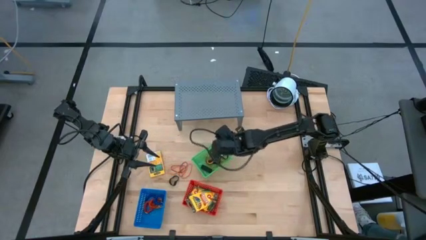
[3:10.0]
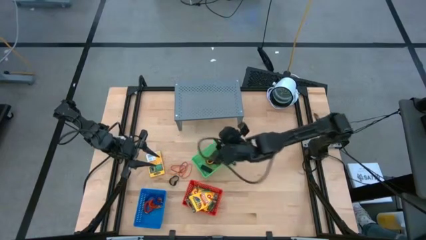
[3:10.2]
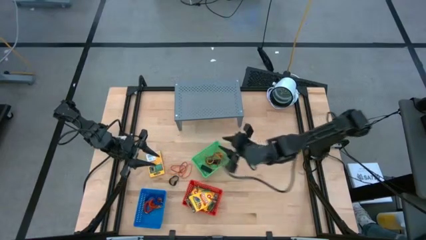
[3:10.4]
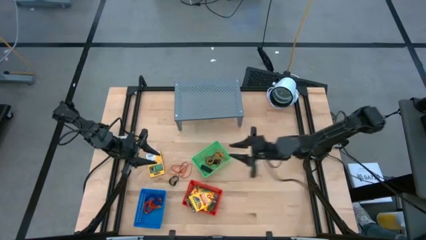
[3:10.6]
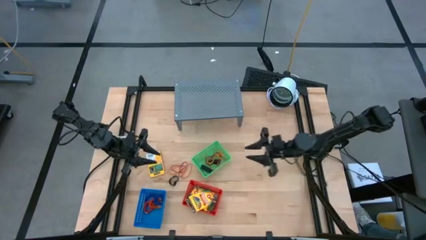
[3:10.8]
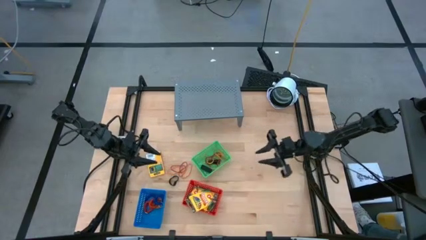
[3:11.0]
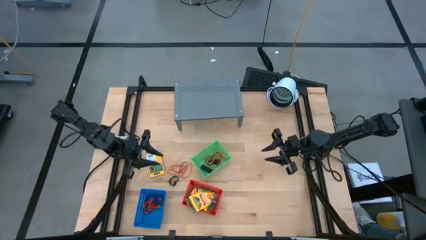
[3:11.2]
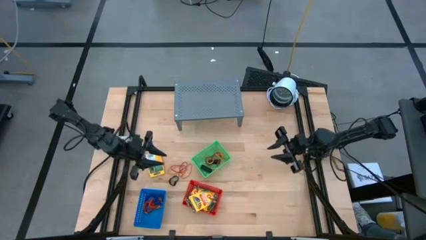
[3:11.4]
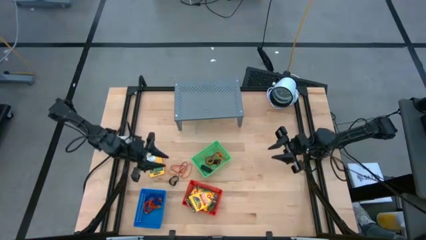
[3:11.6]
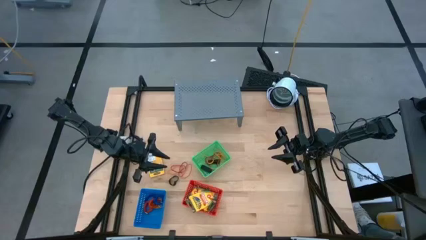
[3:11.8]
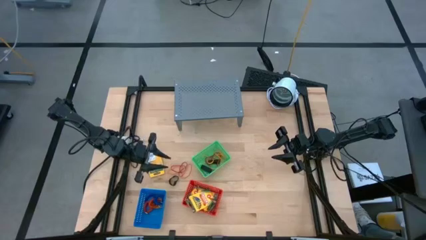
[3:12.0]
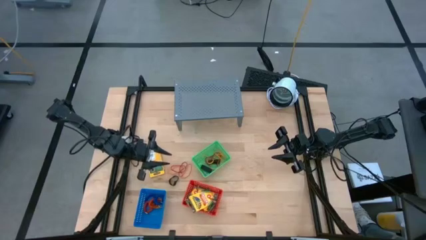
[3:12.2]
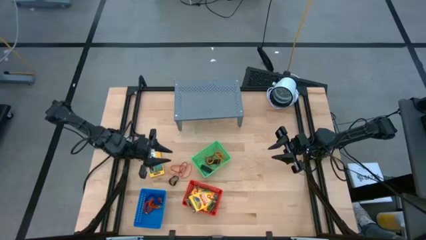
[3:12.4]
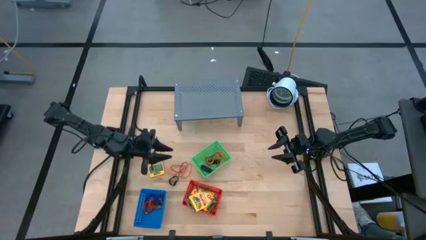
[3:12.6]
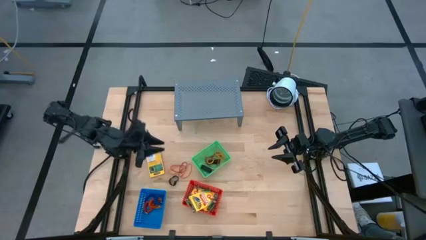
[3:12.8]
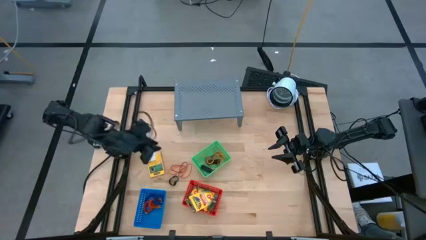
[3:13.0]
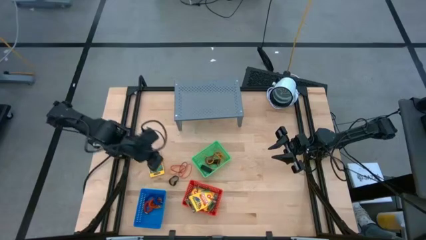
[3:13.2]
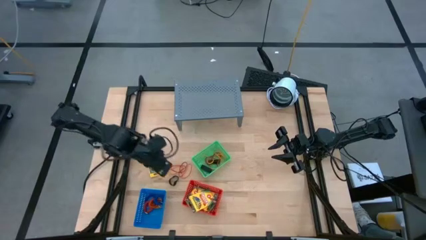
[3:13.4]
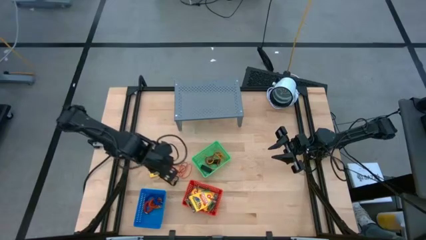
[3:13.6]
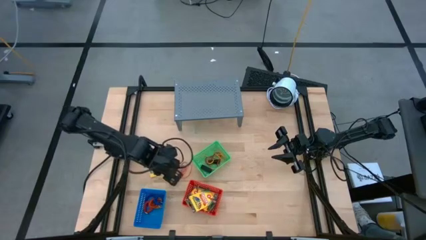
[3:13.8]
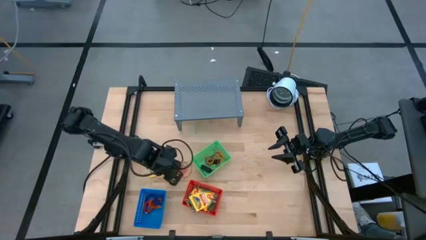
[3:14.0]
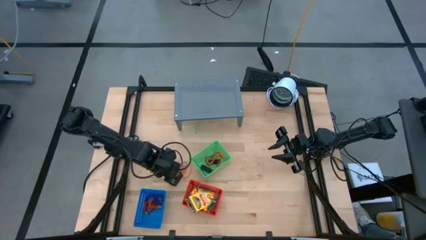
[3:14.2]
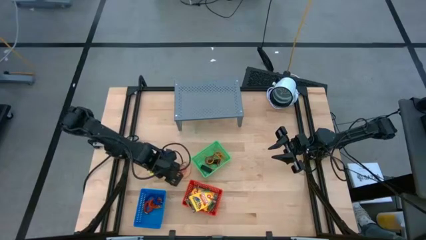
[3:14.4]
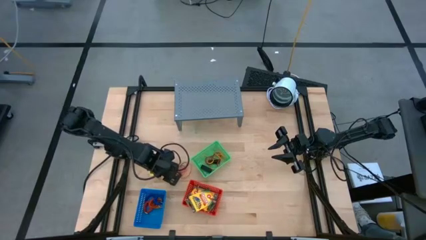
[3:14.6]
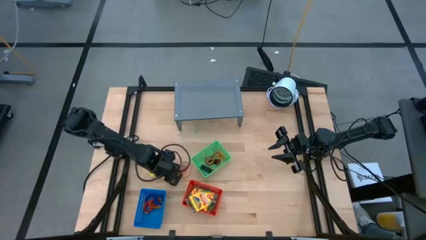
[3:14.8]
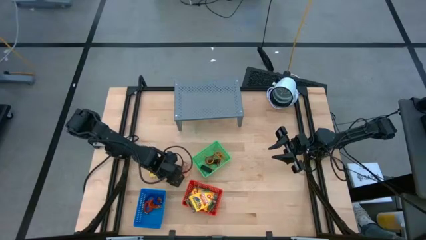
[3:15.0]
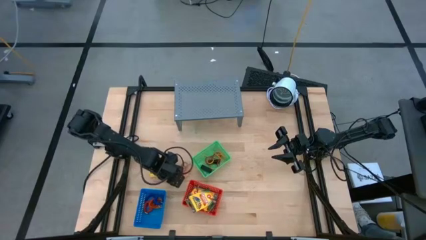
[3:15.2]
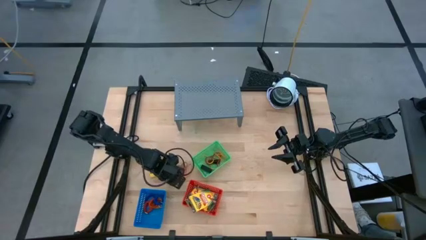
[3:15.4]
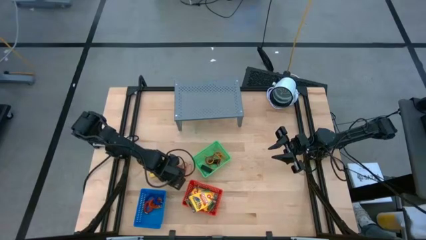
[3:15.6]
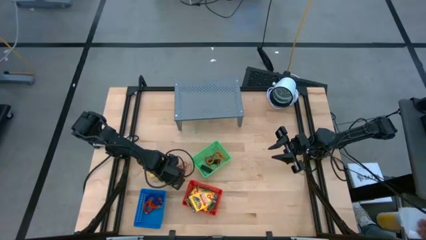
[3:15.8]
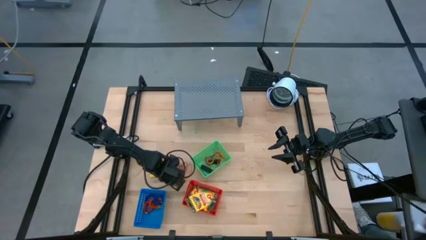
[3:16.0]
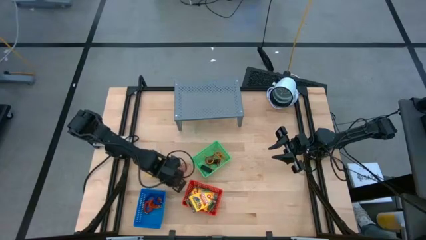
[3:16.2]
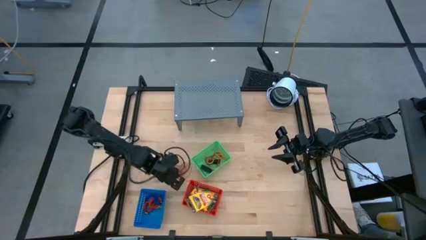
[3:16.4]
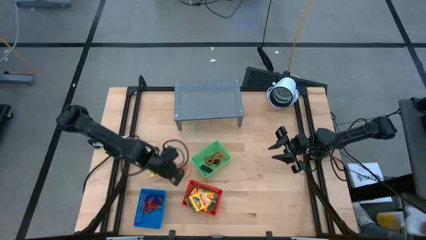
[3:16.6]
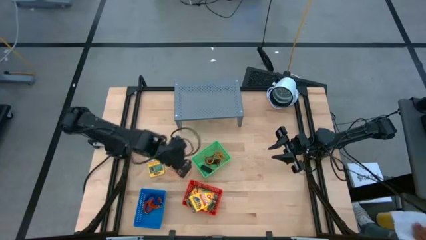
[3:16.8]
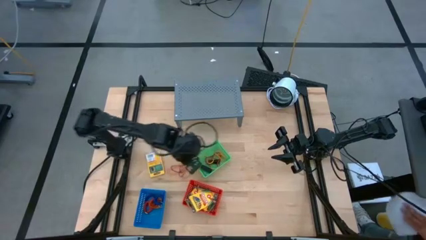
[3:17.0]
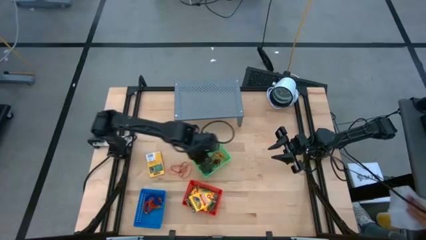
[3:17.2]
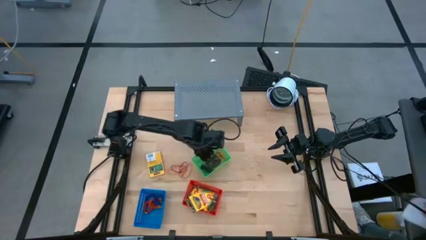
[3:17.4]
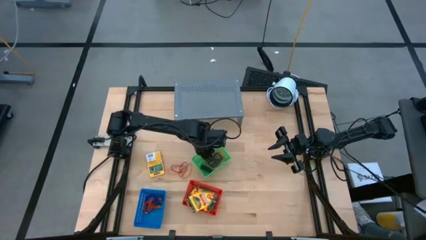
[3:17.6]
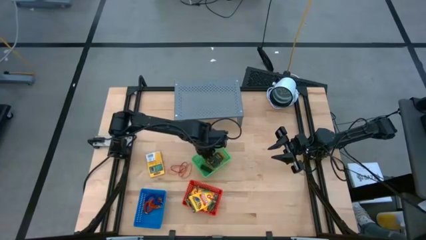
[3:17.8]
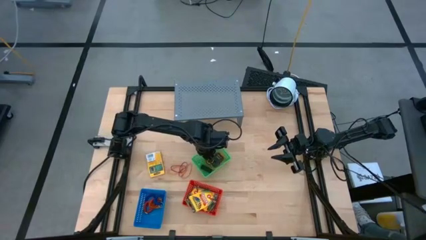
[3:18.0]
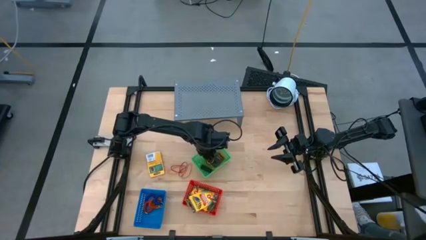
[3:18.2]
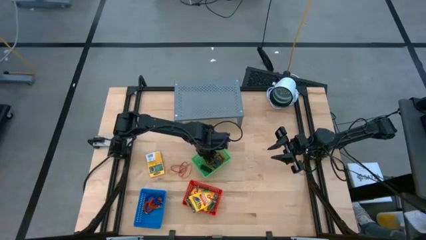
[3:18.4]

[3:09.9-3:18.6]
Task: Pick & Place Office Desk Supplies
Put the black rubber band into the green basket

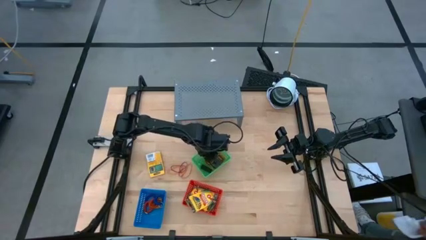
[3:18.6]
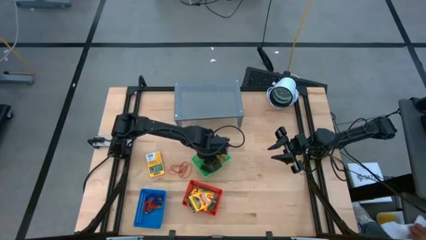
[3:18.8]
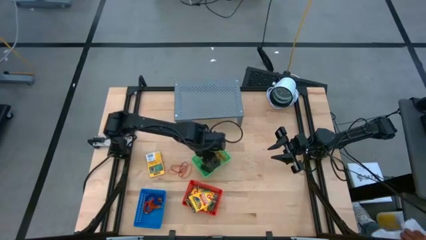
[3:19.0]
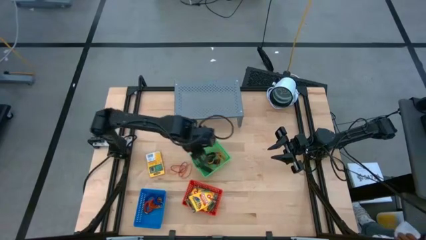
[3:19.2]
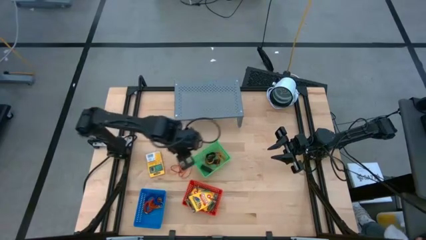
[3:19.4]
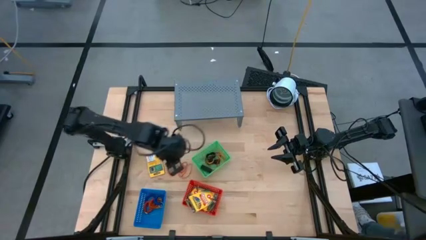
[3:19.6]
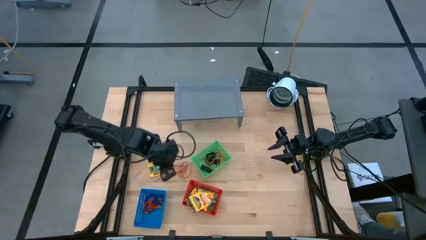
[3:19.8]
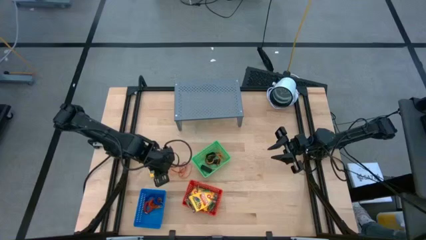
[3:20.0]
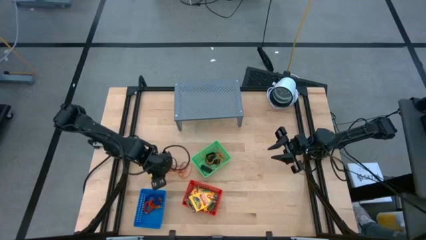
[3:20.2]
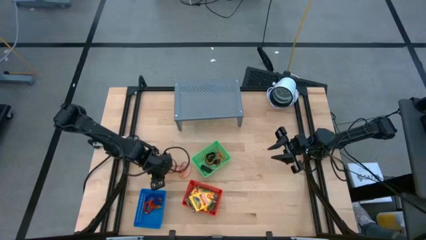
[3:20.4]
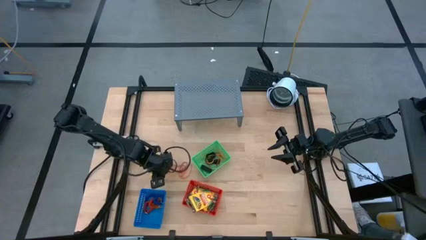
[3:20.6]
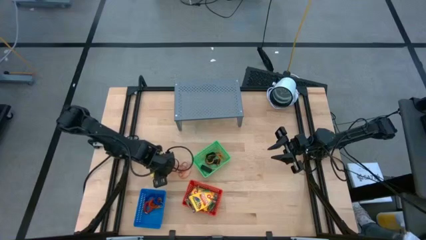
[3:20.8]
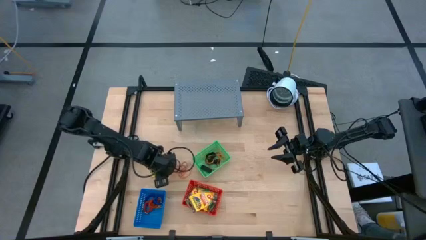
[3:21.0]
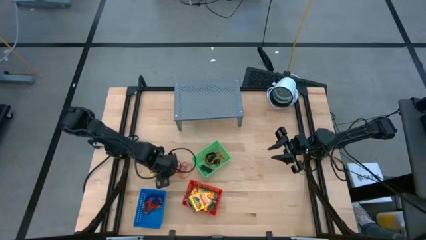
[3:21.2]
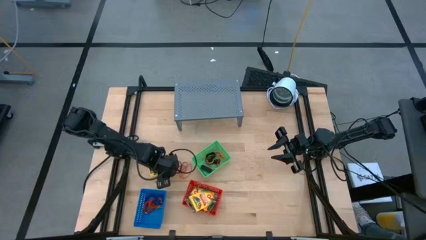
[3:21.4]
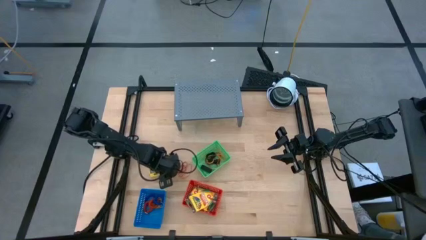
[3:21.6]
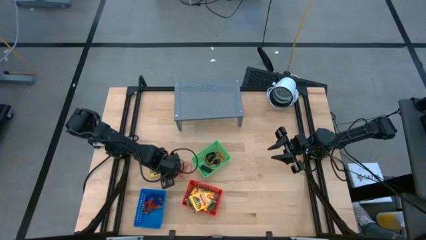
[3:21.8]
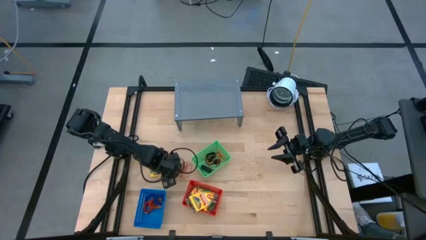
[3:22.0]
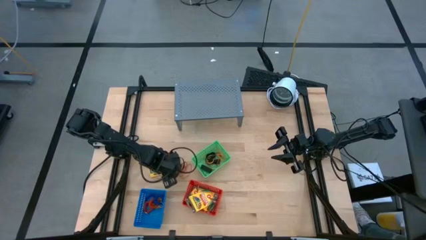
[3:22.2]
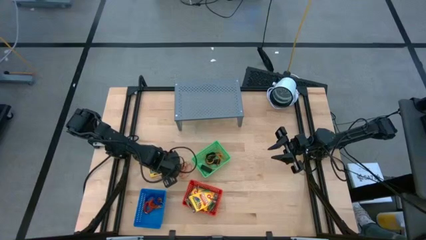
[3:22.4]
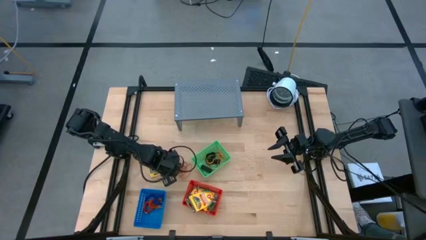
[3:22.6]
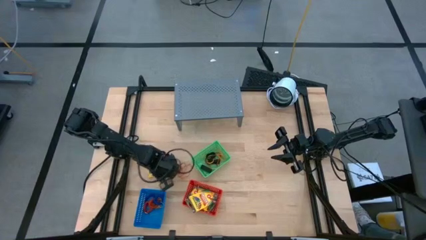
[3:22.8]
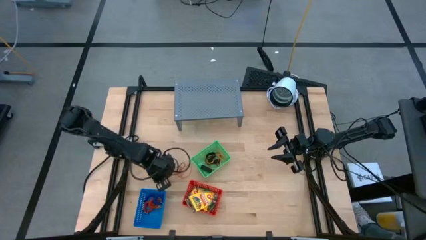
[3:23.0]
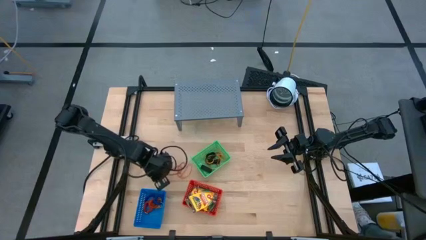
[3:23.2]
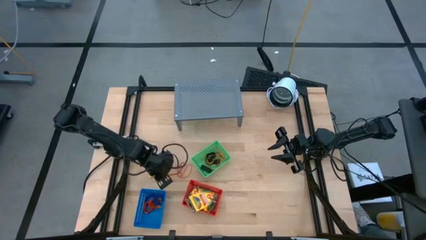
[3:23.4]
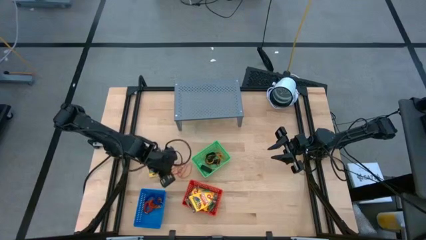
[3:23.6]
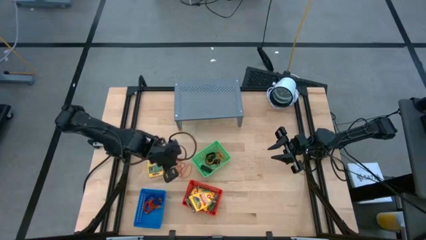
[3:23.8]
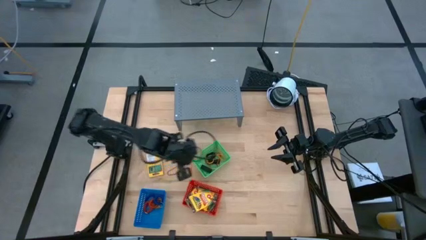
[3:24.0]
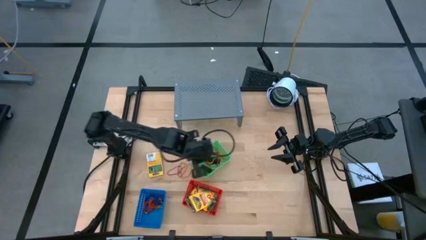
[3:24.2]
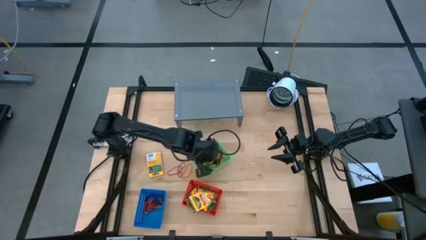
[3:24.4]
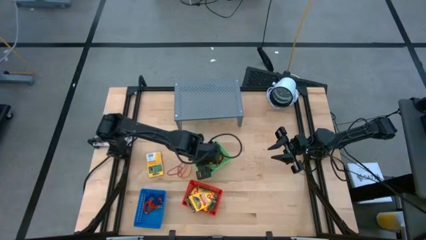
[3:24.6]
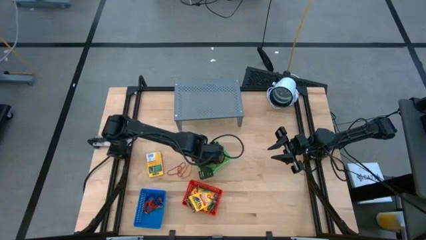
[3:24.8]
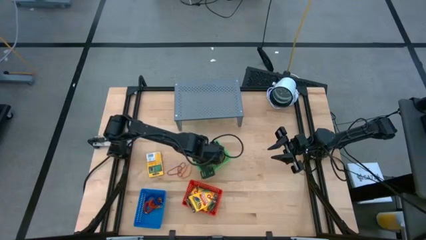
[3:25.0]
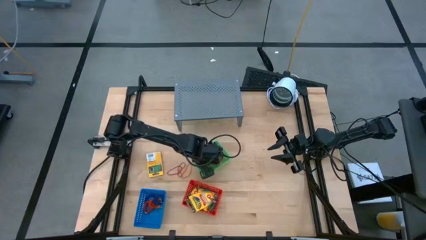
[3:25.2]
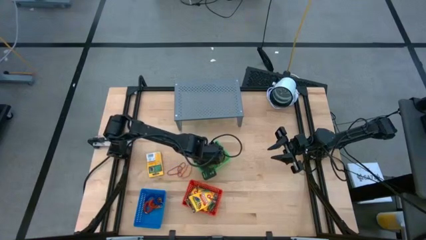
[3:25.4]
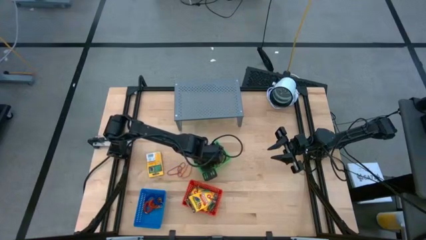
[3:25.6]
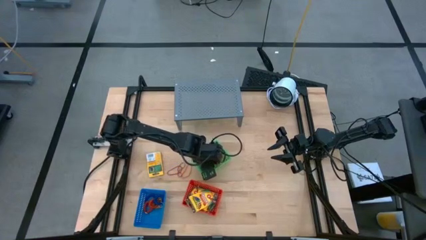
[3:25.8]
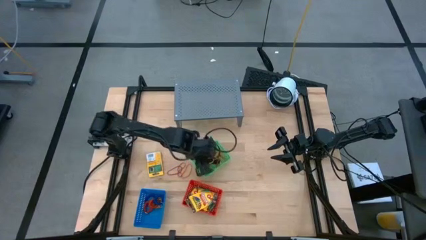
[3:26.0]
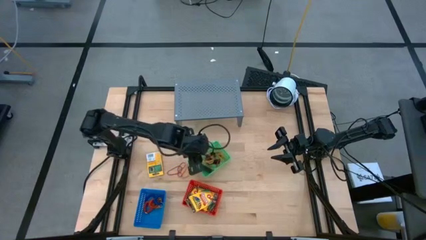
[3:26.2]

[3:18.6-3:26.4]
Put the left orange rubber band into the green basket
